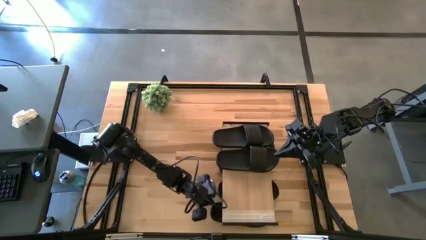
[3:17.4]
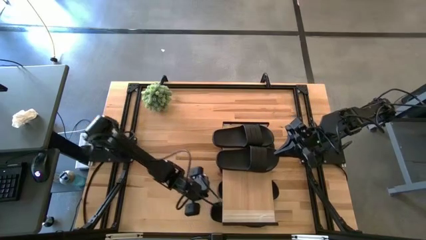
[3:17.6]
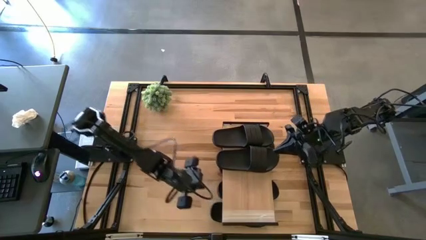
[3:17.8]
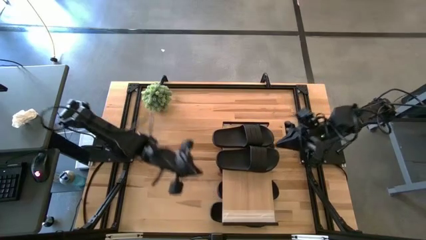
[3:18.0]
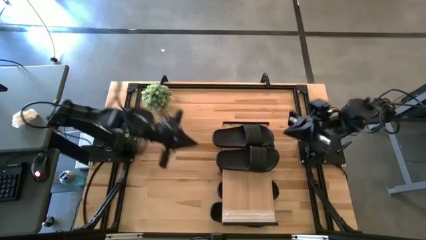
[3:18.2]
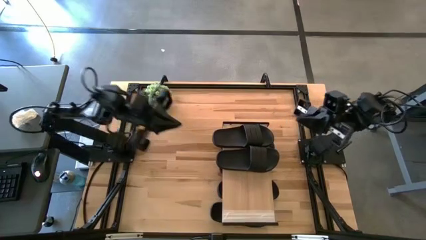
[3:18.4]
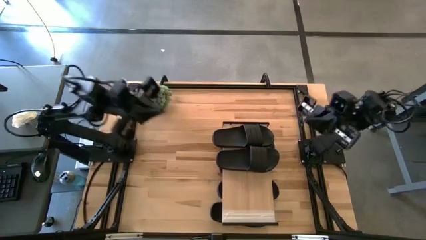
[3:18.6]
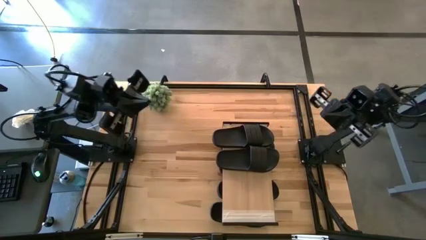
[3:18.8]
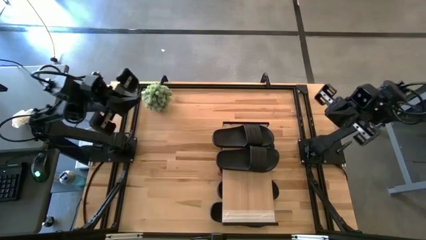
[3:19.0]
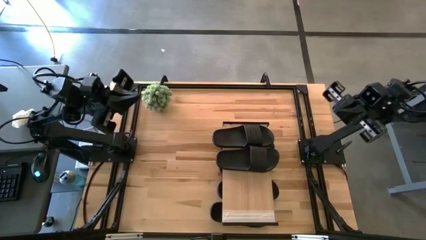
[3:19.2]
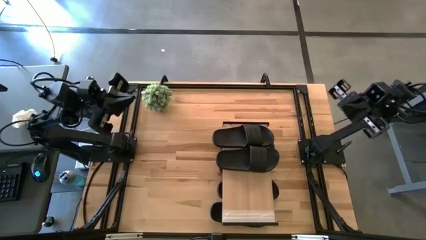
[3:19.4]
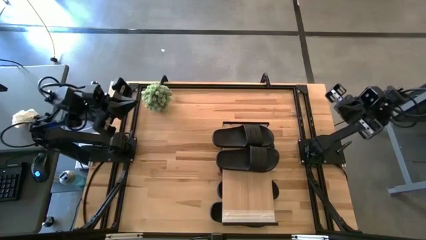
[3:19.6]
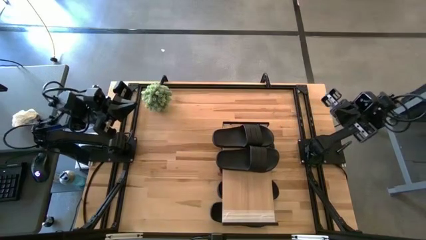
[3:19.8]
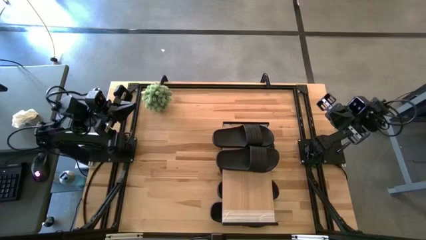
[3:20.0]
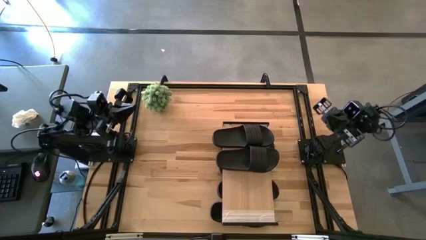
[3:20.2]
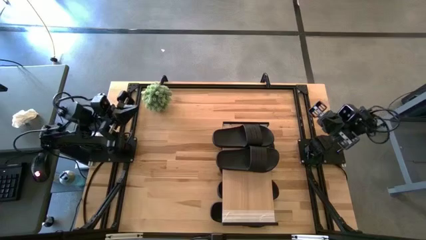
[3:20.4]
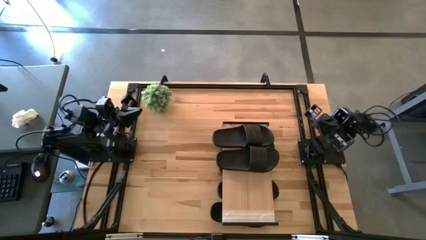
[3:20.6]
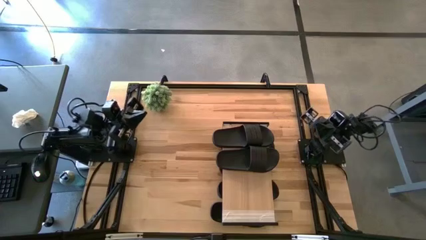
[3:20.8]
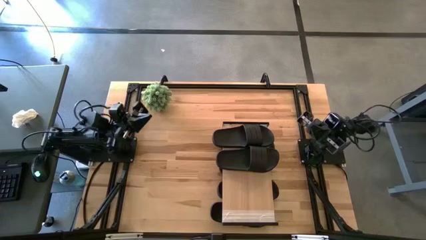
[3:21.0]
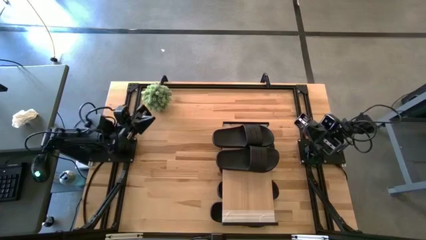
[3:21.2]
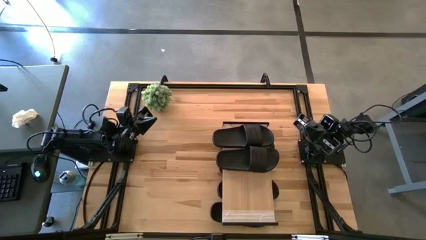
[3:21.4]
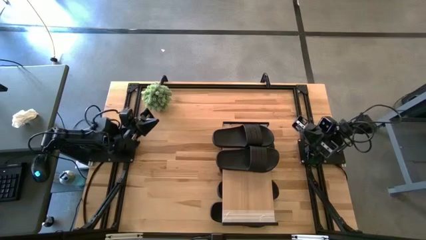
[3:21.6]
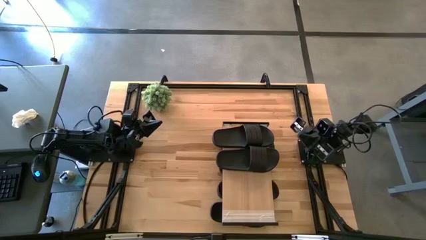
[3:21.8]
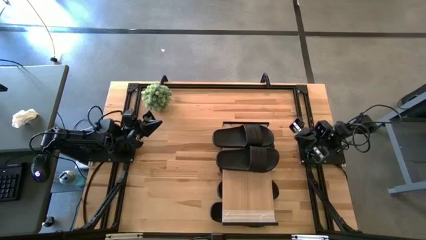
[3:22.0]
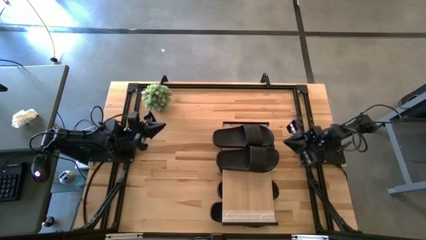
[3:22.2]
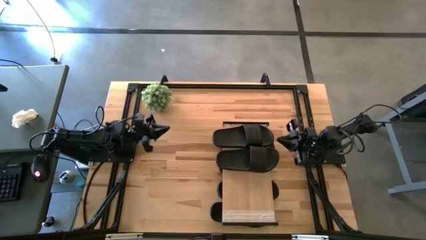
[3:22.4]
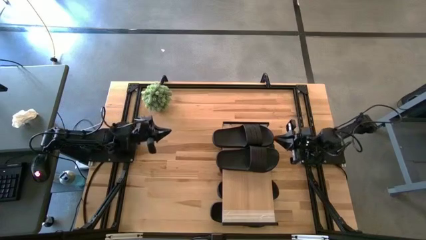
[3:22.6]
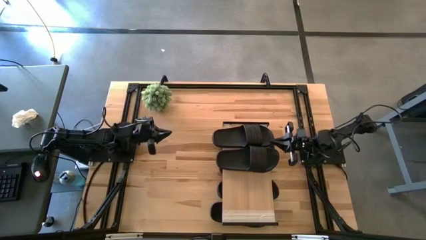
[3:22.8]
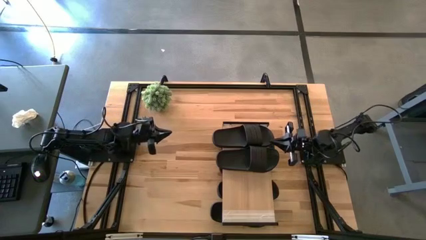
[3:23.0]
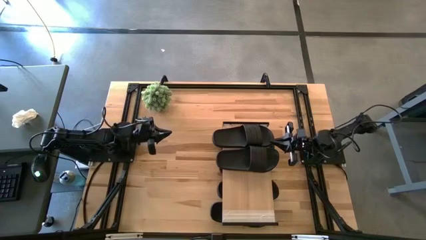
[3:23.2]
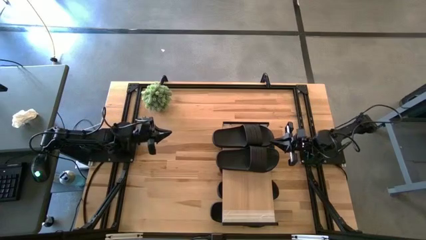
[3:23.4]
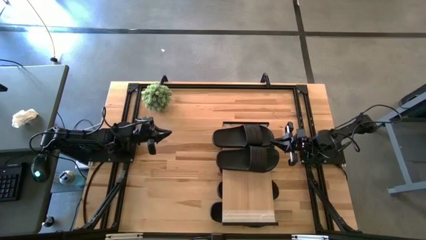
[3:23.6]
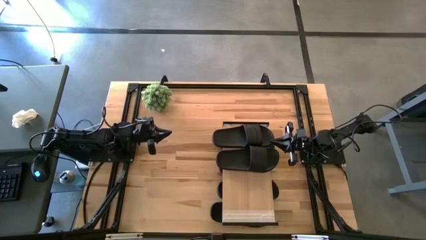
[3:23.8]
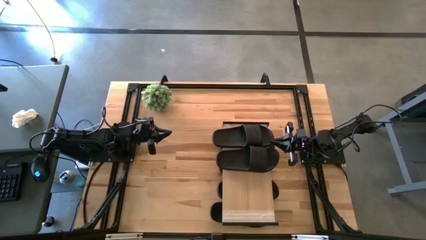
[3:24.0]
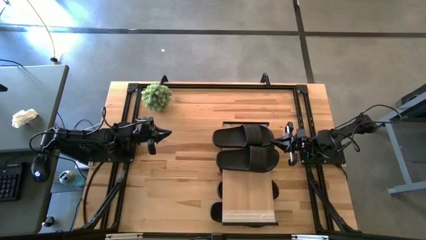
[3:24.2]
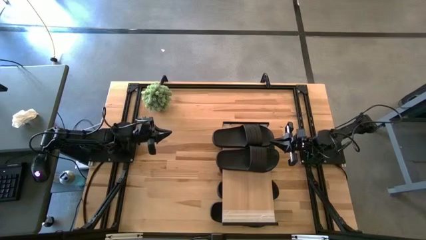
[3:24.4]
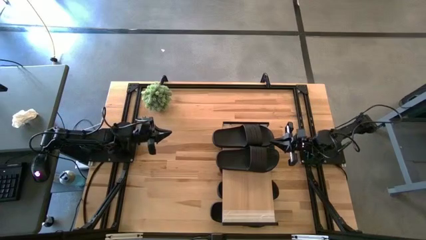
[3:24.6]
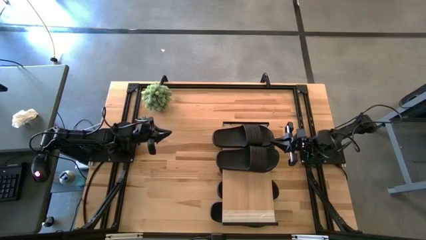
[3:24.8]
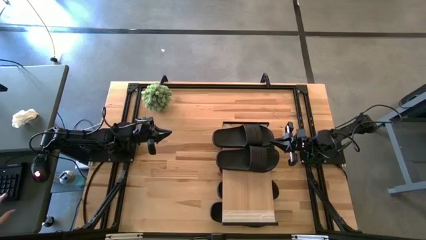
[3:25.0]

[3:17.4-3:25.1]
Task: Pick and place slides into the shelf
Return to Home Position

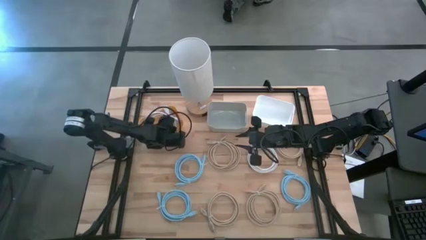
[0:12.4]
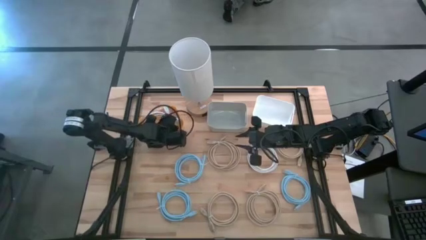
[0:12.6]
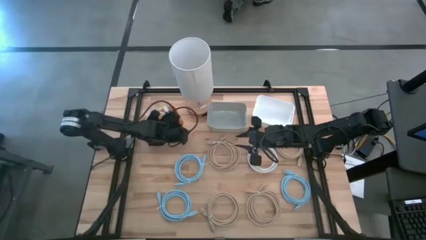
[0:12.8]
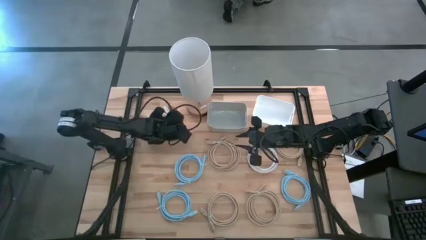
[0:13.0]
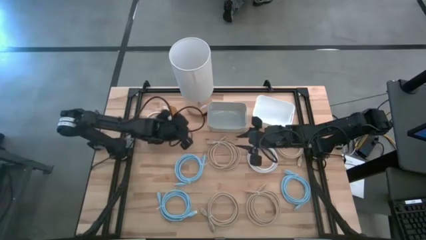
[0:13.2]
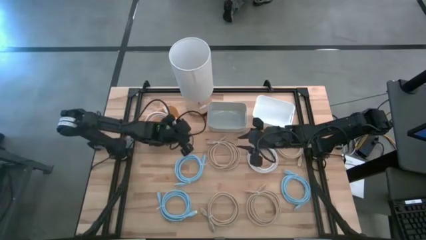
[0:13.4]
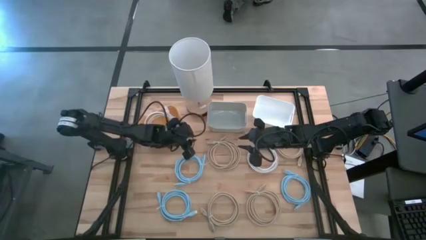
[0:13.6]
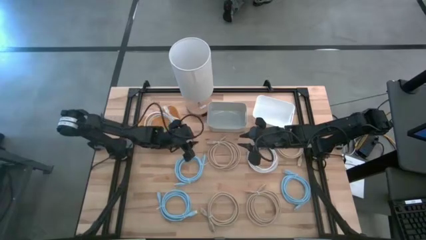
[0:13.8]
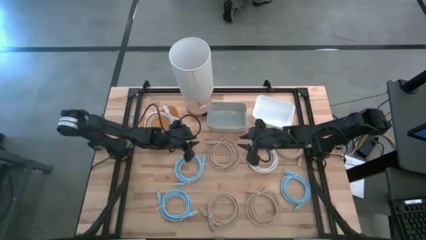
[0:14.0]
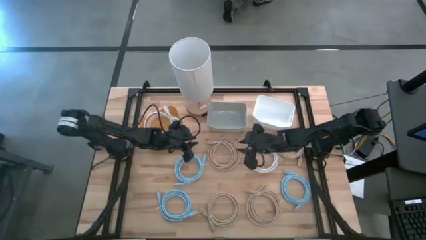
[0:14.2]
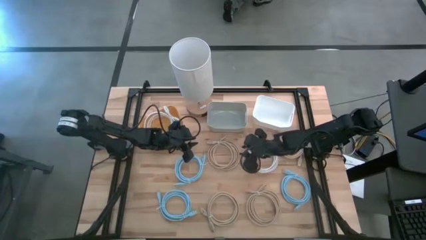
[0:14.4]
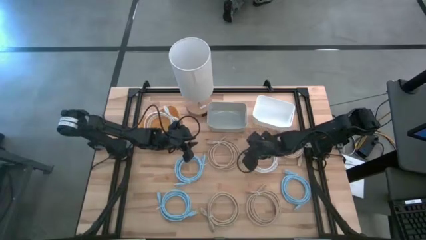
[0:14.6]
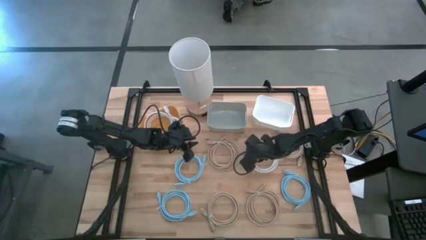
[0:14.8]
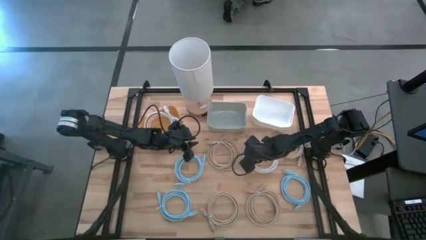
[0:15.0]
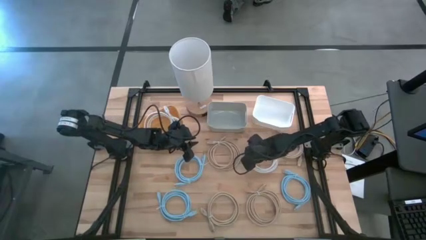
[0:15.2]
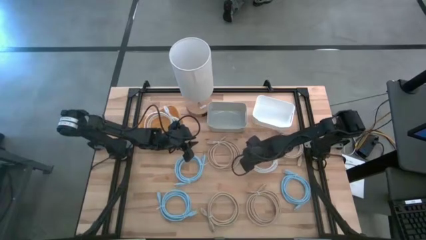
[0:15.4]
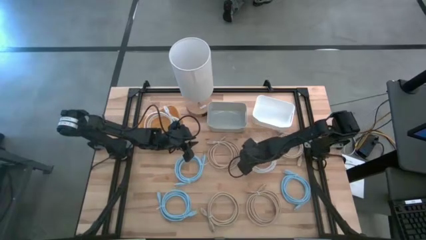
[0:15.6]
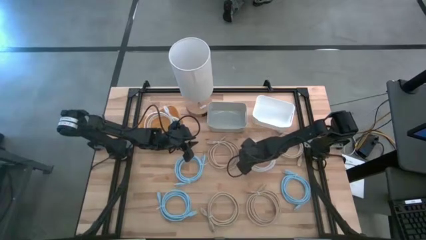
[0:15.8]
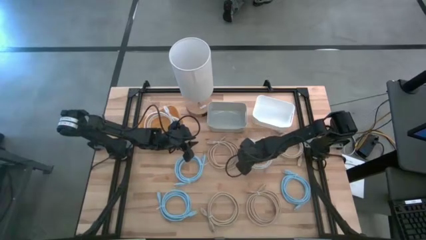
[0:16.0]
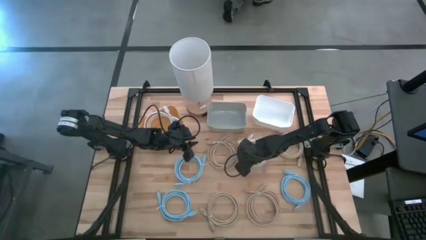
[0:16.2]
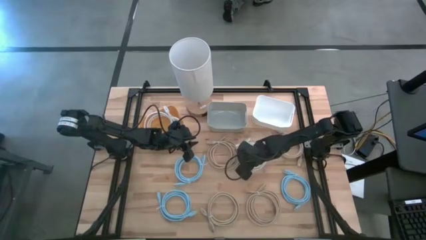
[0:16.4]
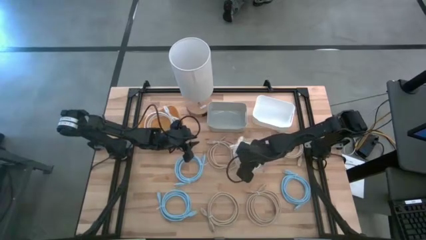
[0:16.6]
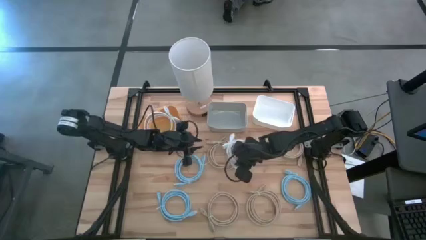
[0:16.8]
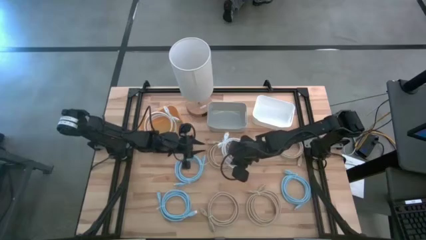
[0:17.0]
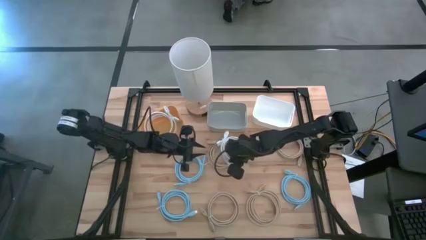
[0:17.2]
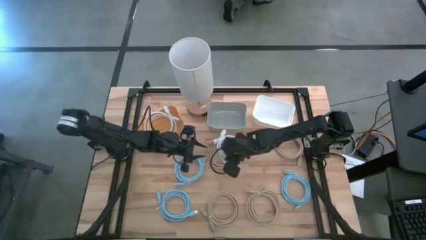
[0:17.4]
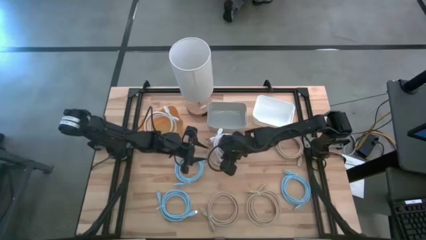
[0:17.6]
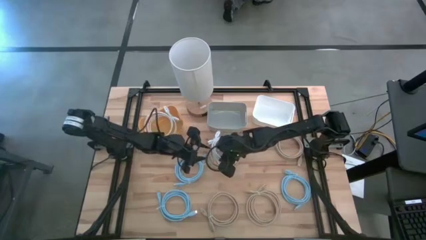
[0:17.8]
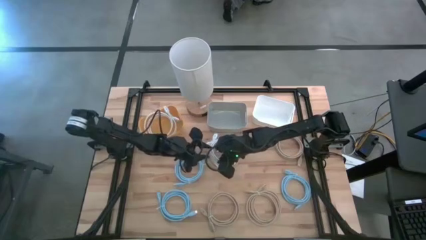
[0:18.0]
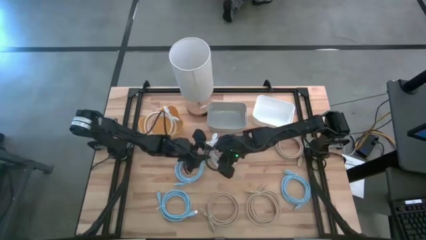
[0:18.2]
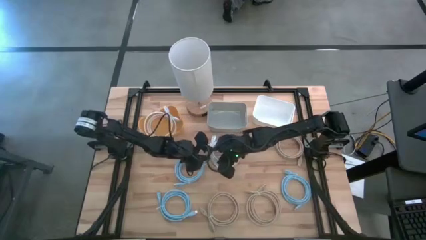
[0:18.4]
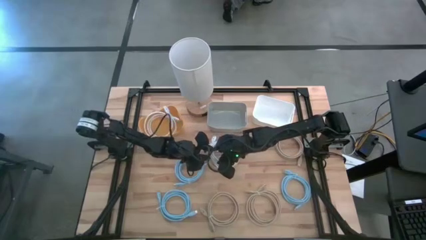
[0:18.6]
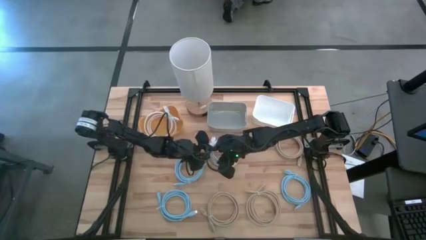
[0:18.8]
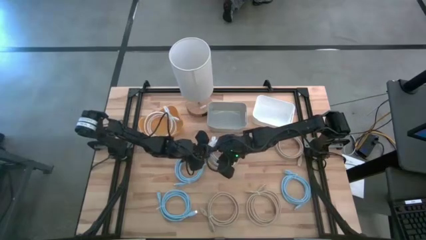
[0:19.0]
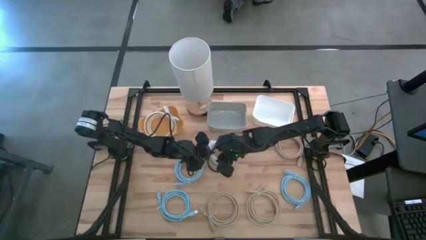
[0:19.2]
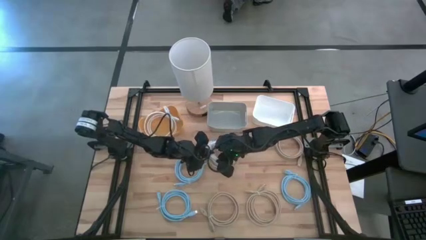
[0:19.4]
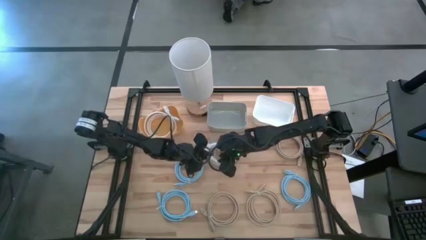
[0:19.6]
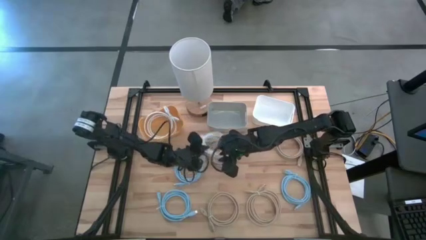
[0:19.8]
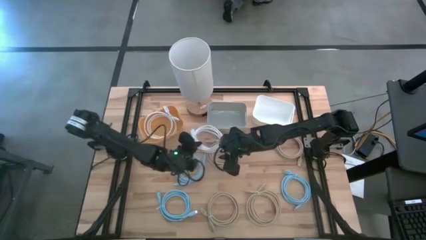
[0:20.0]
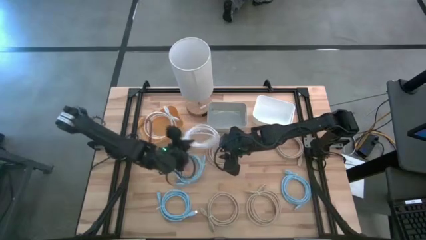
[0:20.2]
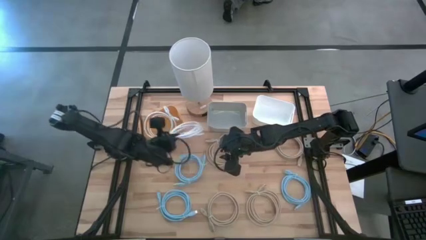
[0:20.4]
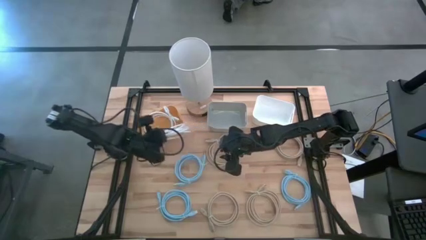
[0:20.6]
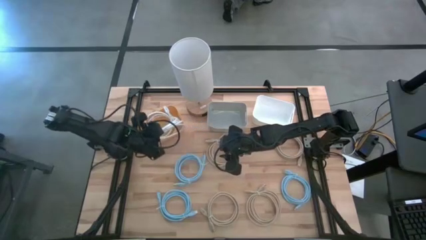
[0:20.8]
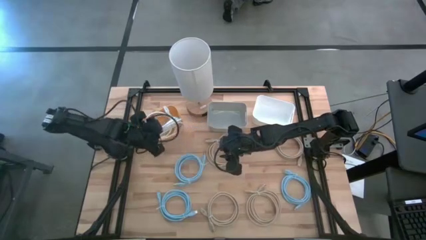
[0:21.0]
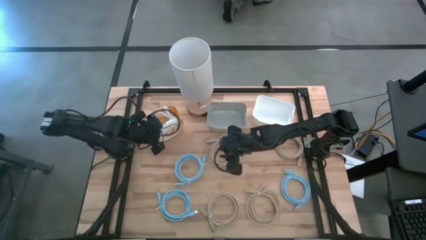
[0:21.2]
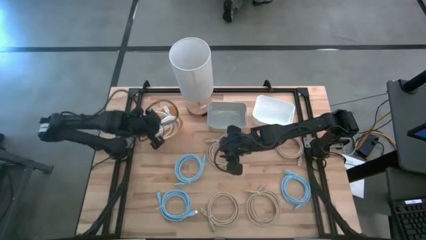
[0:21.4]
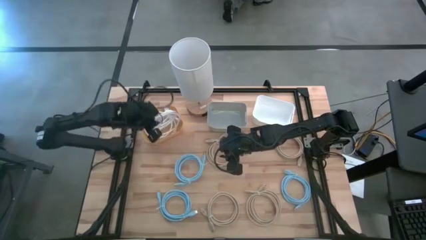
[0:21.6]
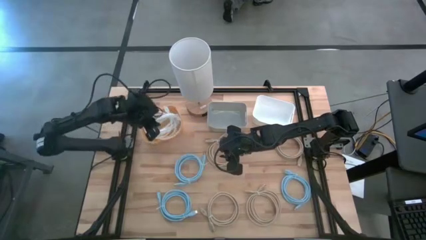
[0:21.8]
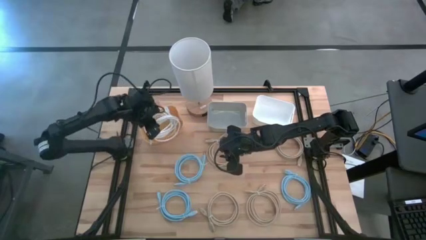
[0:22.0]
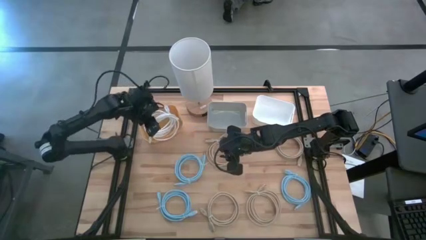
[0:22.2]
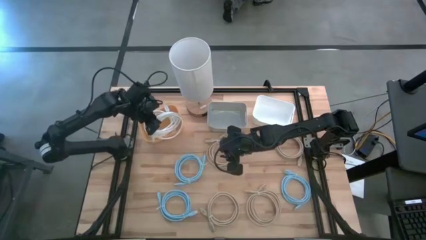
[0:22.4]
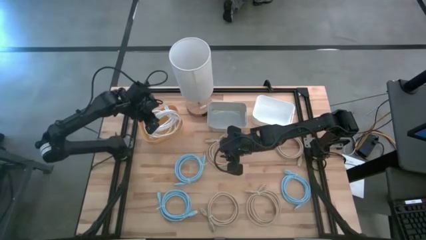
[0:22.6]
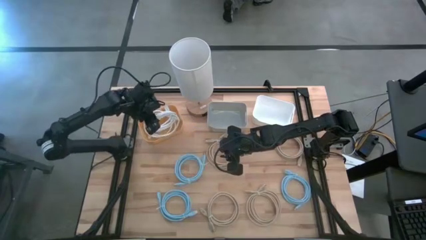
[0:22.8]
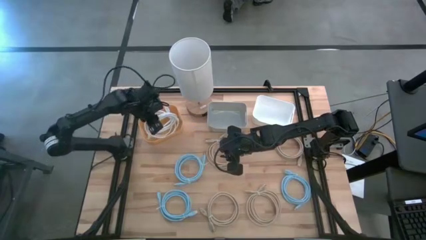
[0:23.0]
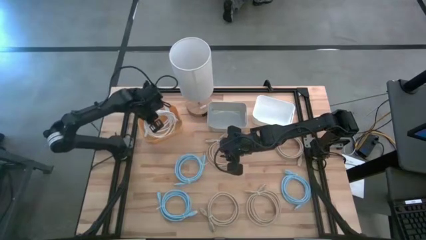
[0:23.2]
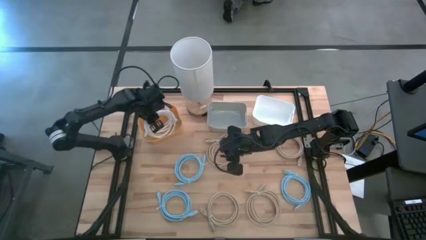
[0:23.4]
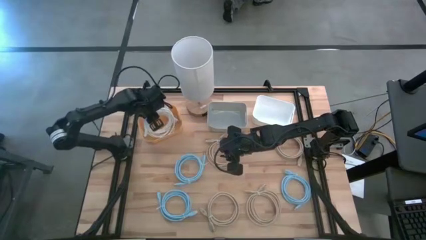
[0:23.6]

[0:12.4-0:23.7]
Task: Sort HDMI cables
Put the white HDMI cable into the yellow bin
